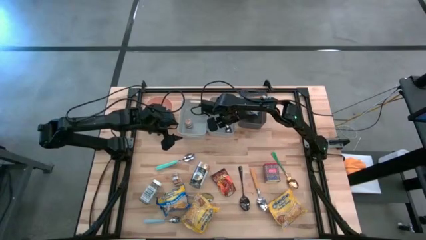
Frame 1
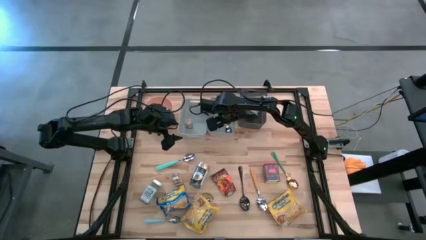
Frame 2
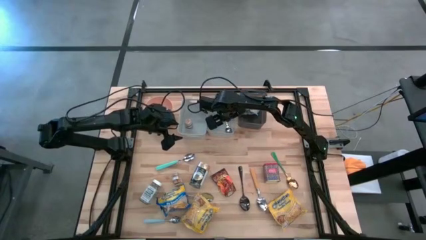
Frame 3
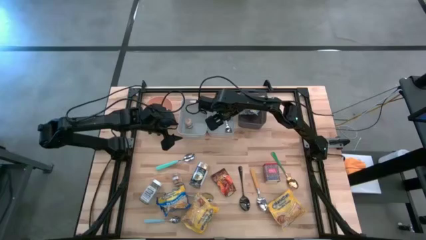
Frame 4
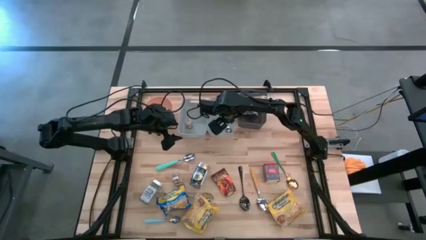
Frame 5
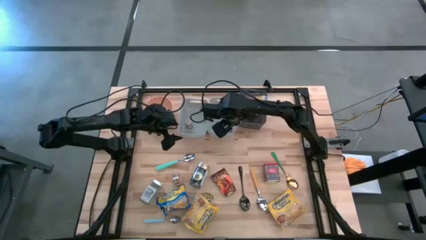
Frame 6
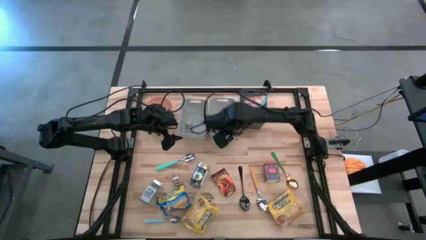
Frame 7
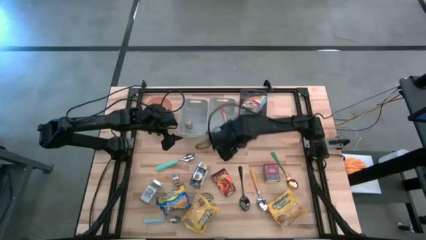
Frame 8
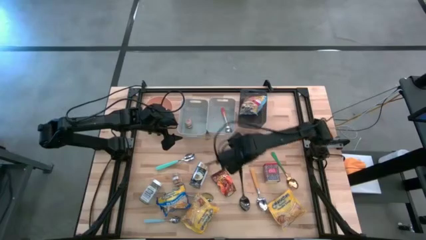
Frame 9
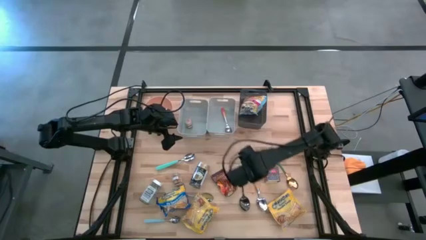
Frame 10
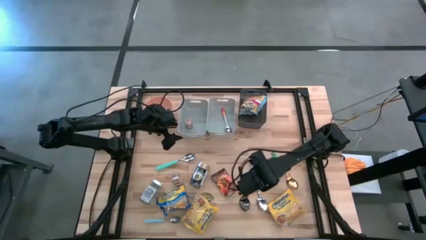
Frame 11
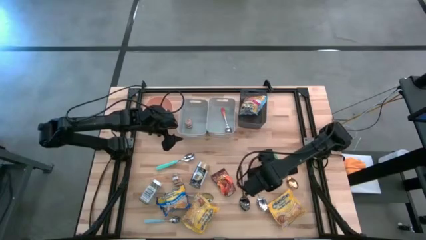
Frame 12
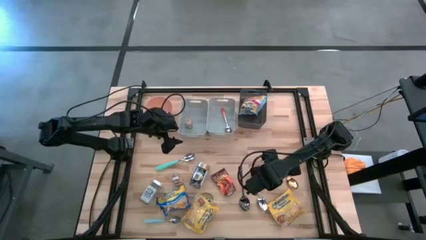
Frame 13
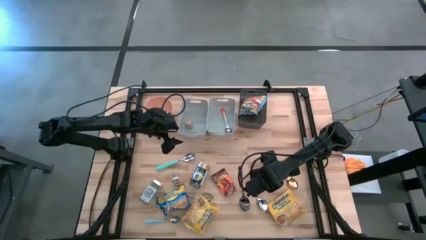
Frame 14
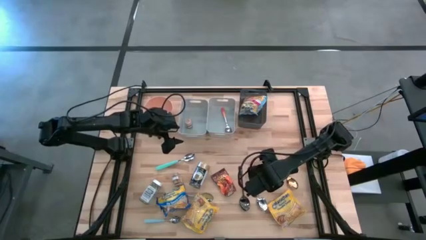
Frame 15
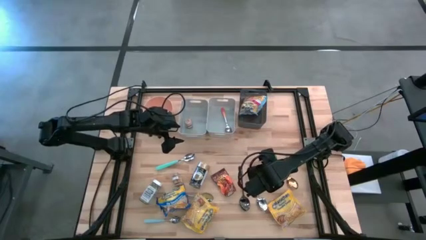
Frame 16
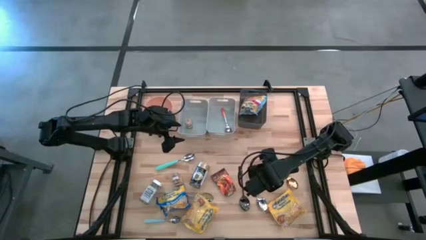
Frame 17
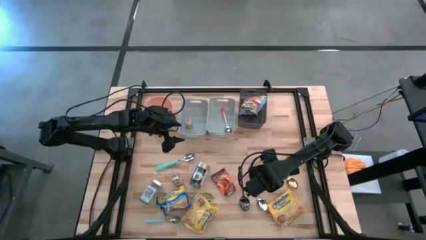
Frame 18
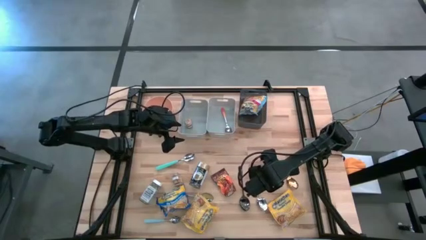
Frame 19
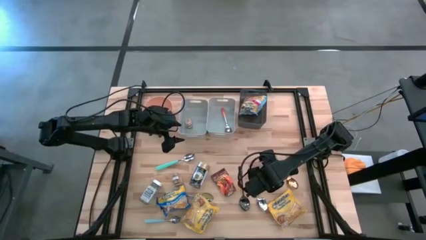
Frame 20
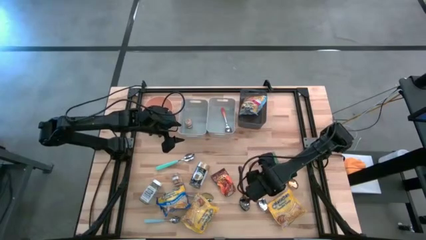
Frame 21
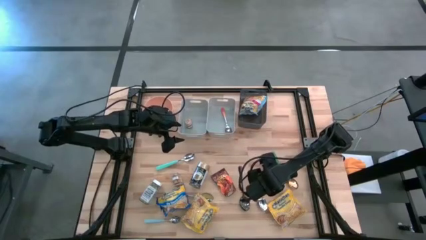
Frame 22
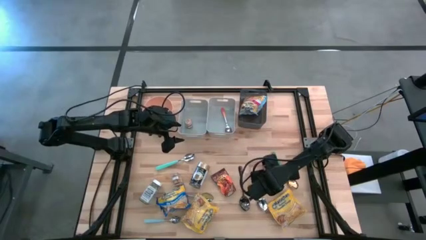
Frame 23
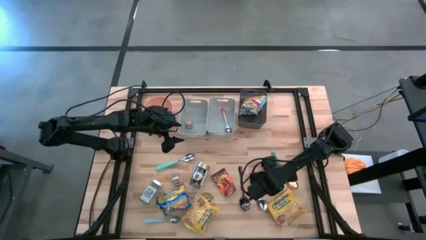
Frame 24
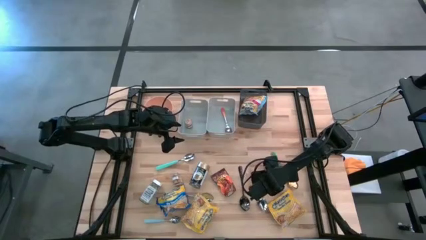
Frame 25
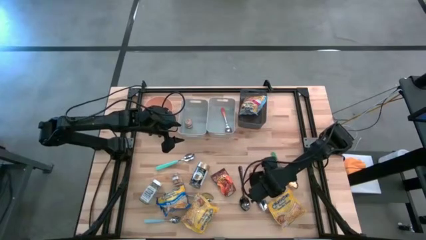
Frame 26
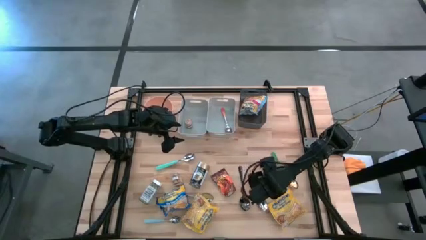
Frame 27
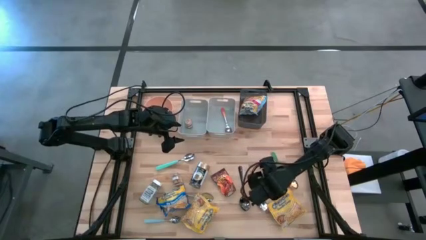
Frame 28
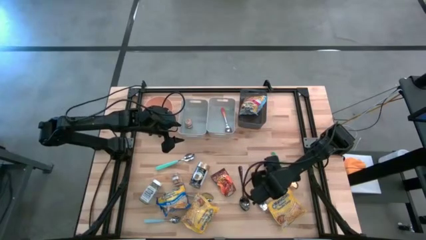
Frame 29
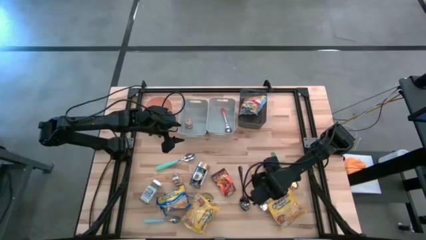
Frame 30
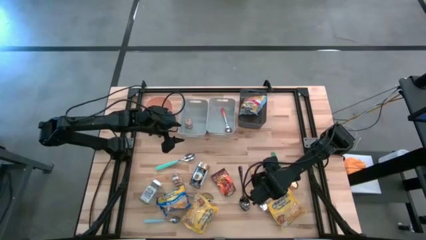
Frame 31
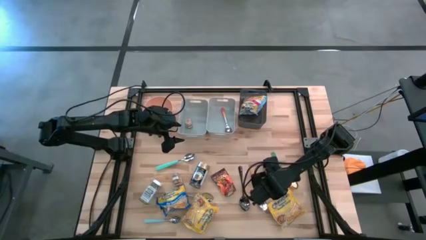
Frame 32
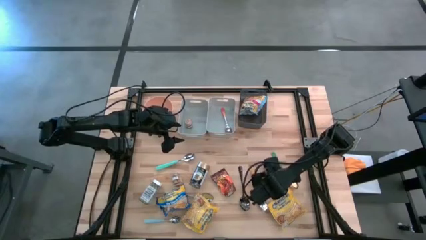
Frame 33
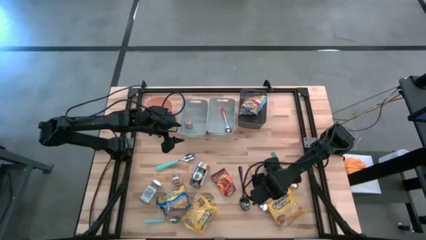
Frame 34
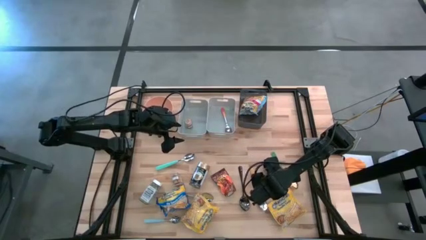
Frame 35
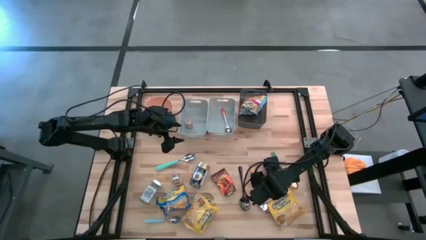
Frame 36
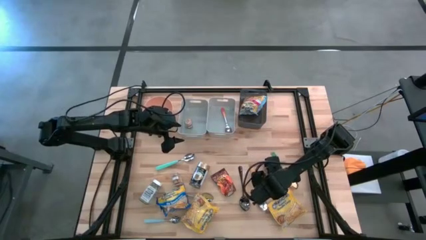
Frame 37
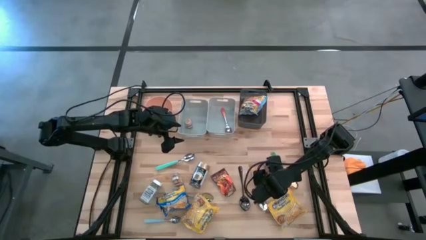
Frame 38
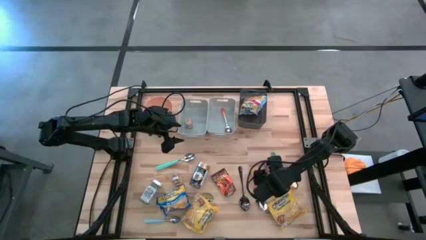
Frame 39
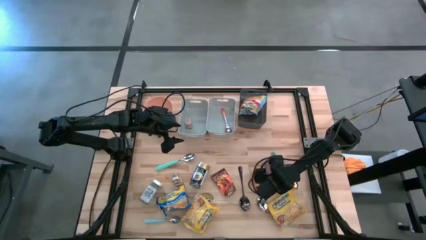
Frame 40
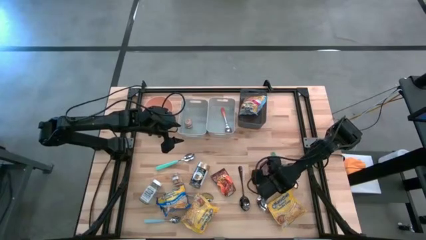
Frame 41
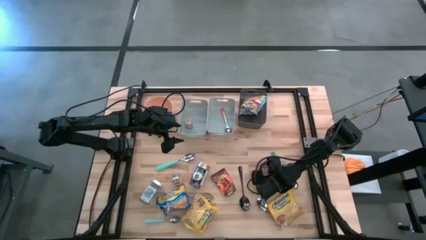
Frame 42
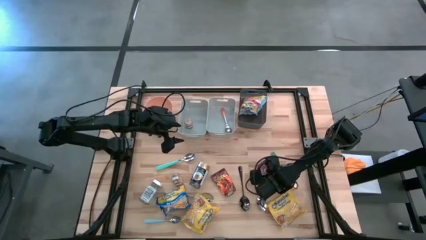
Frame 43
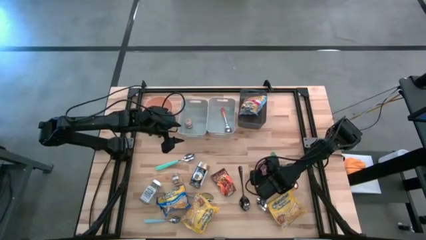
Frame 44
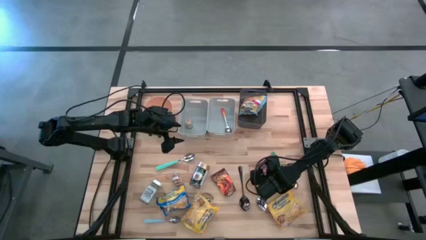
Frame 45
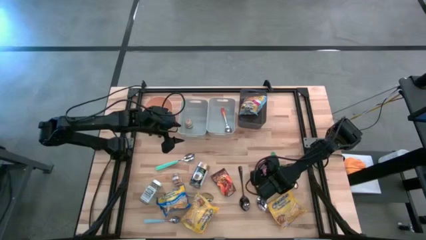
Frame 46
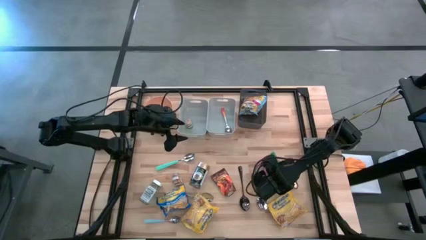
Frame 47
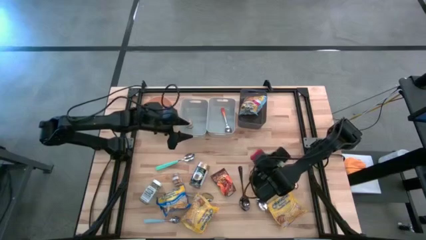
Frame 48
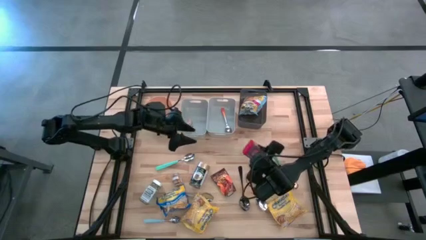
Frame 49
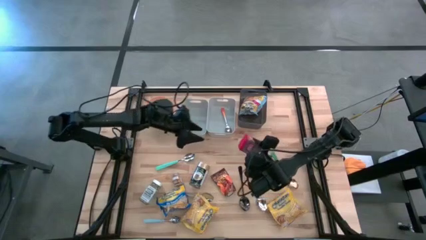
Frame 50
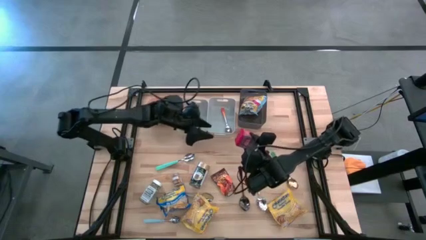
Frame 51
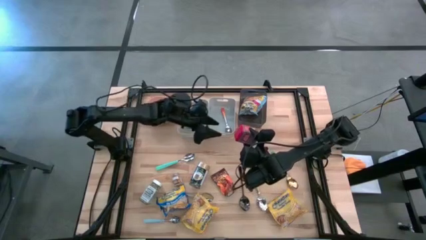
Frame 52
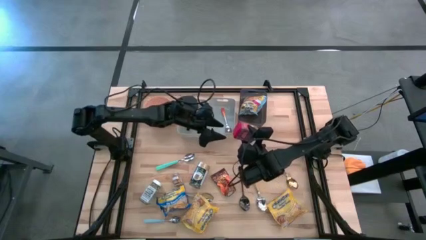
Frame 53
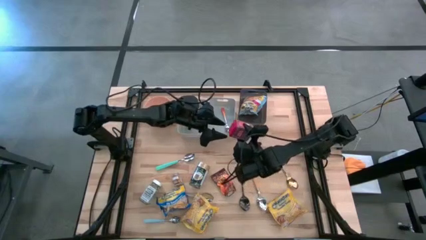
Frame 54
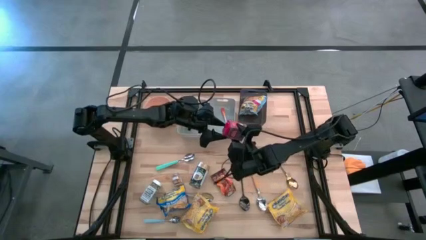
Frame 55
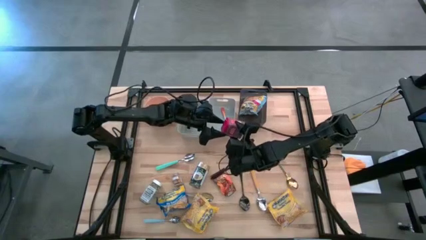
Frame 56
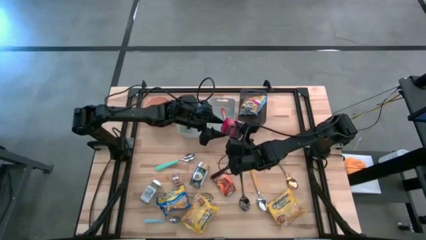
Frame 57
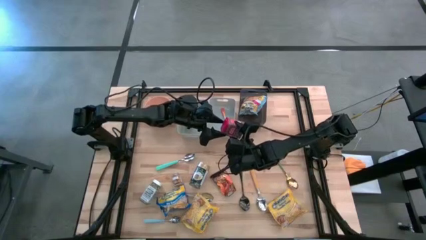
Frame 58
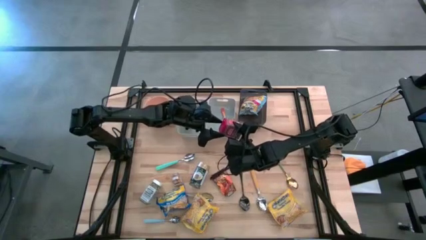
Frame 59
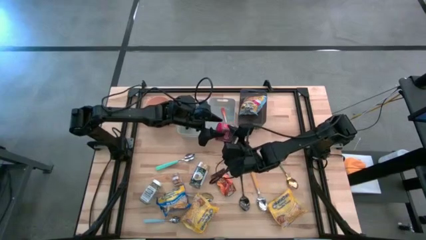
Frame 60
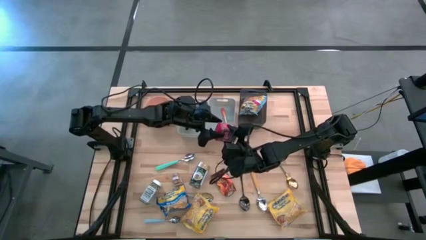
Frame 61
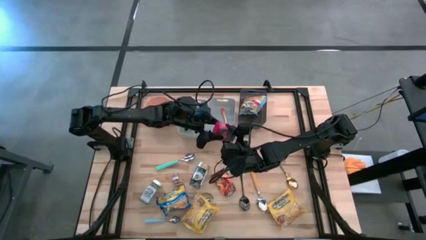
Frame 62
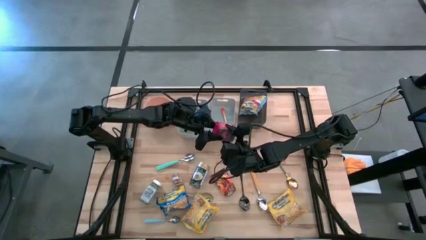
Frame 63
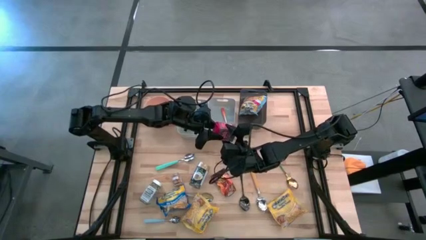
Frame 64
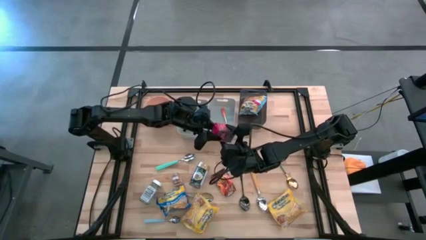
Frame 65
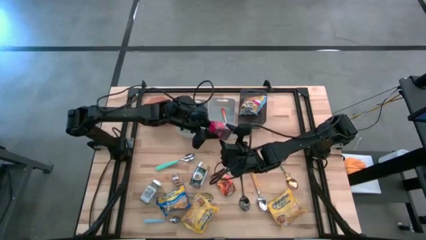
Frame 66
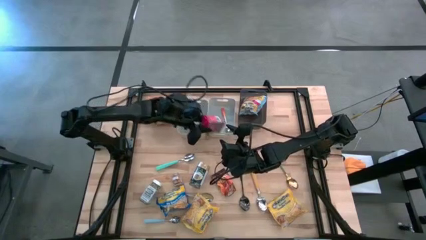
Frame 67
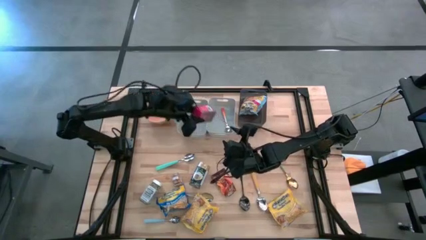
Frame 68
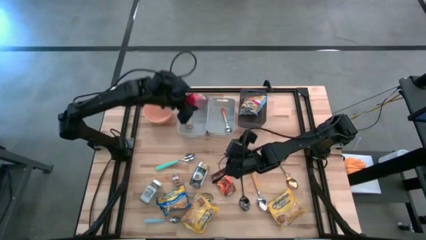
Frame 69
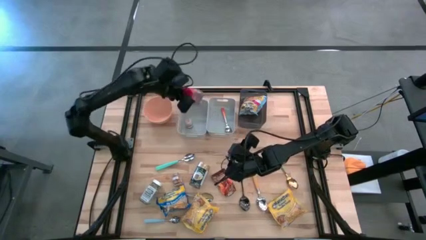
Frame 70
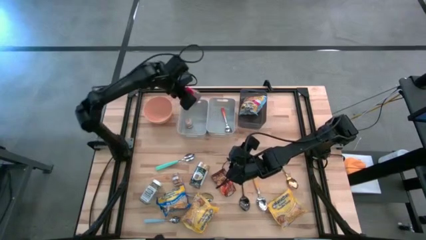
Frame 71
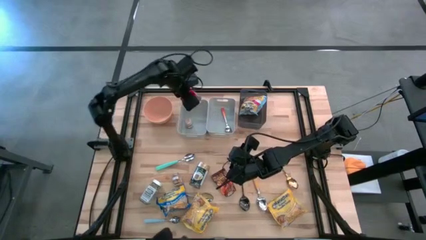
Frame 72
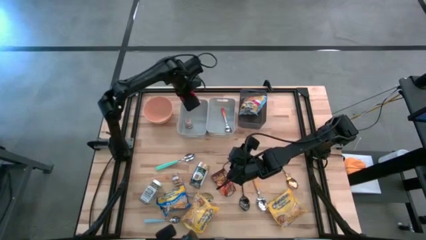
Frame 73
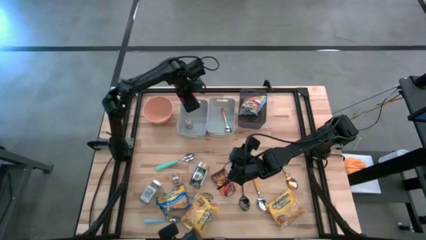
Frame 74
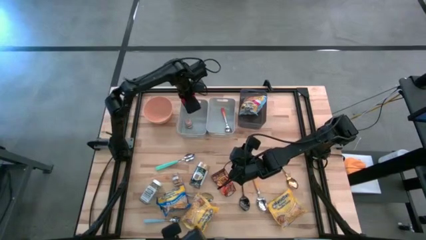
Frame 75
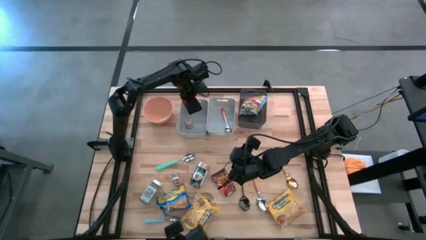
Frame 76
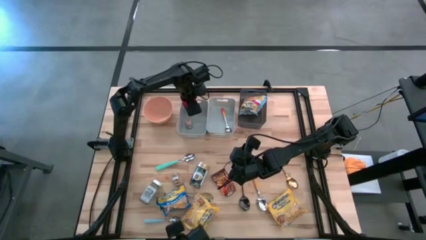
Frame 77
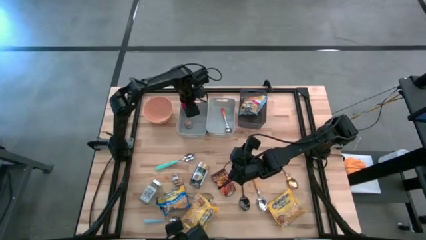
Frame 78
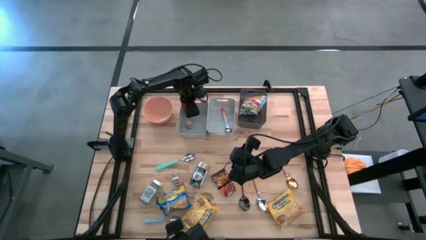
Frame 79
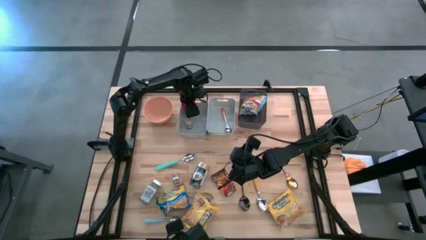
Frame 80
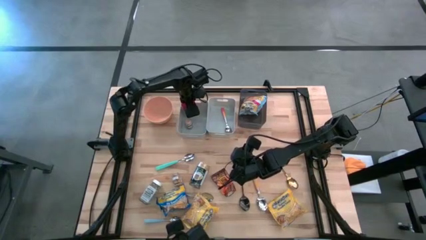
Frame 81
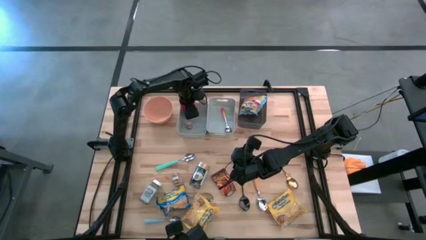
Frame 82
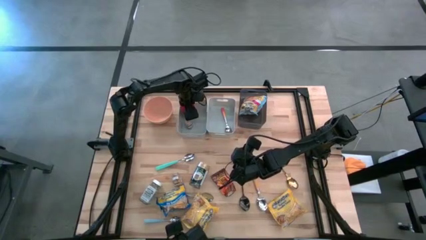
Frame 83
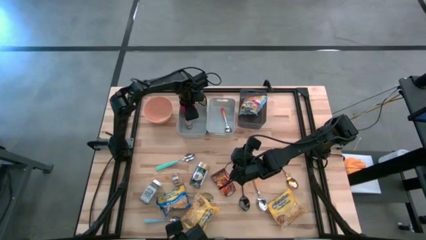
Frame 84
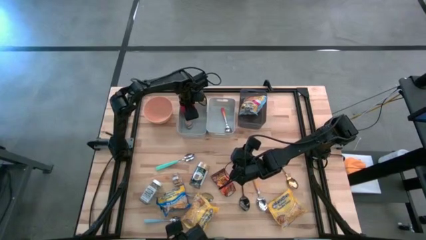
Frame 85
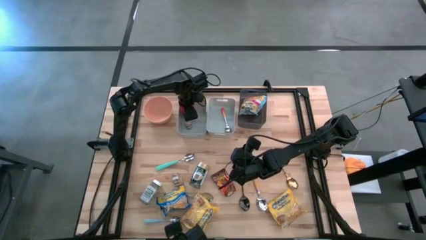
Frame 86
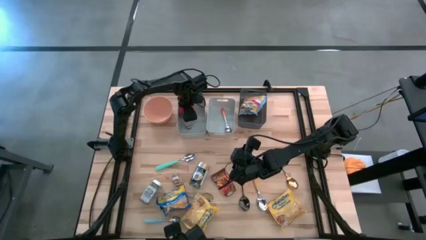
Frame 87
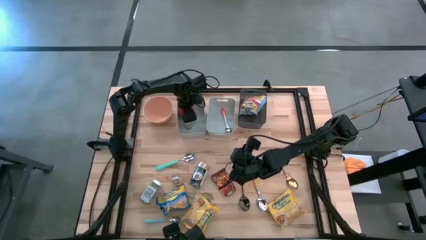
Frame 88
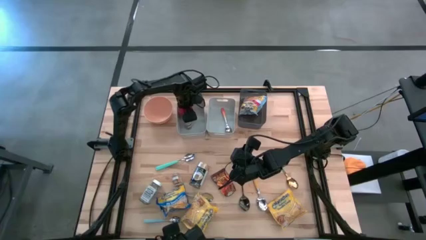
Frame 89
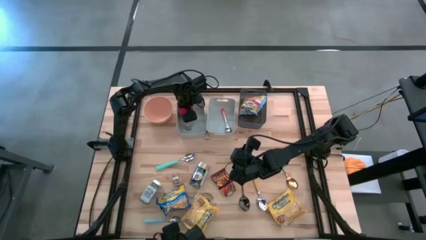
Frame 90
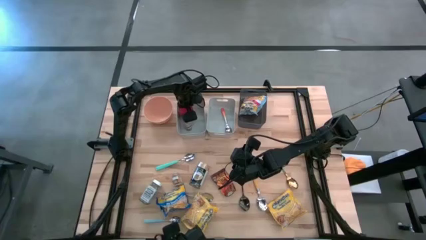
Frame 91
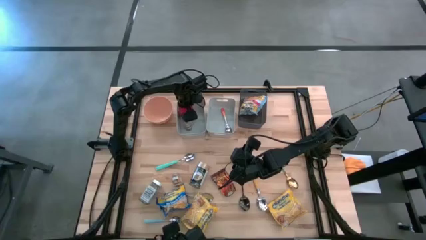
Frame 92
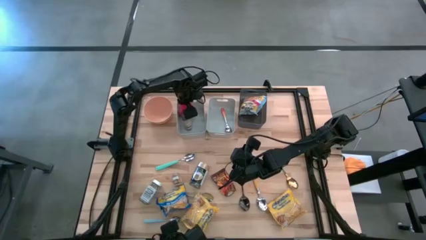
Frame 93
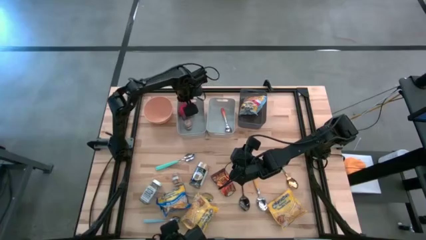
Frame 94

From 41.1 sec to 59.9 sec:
Put the red seasoning can into the left gray bin
